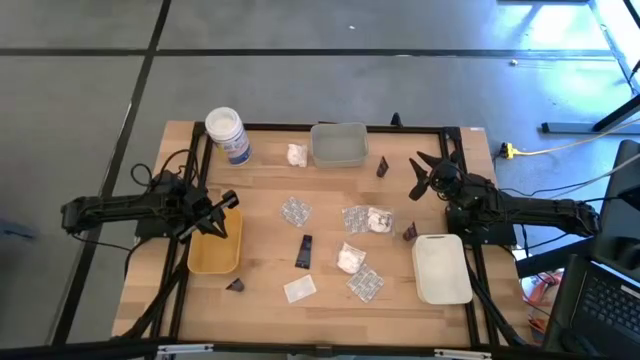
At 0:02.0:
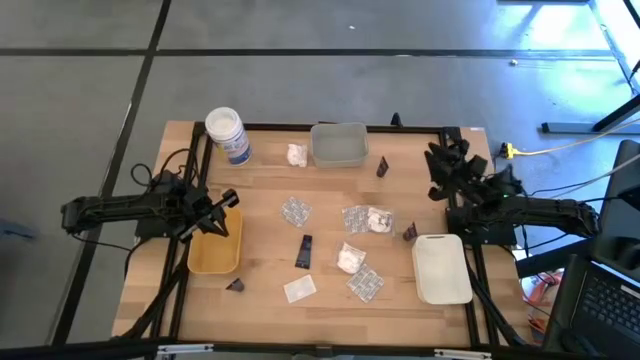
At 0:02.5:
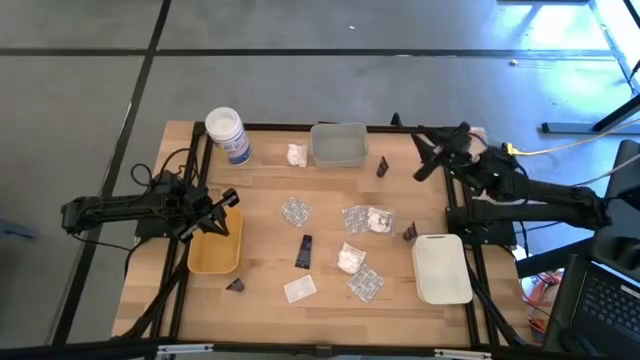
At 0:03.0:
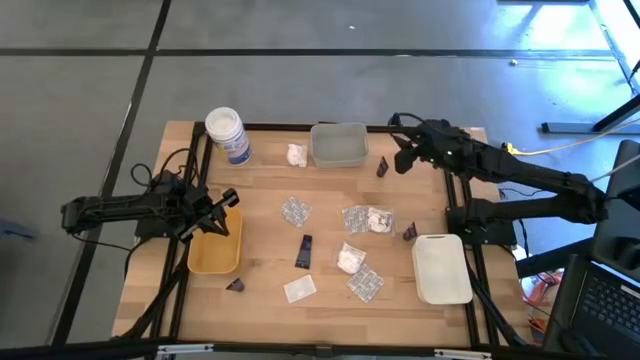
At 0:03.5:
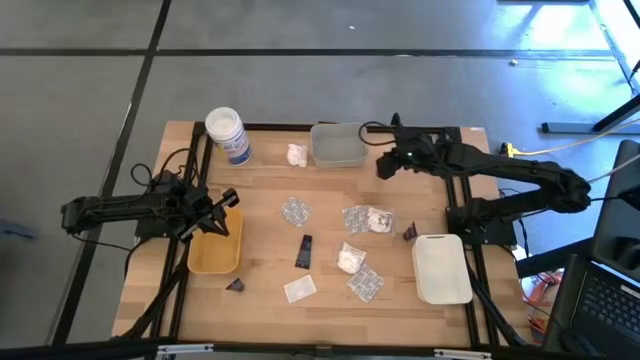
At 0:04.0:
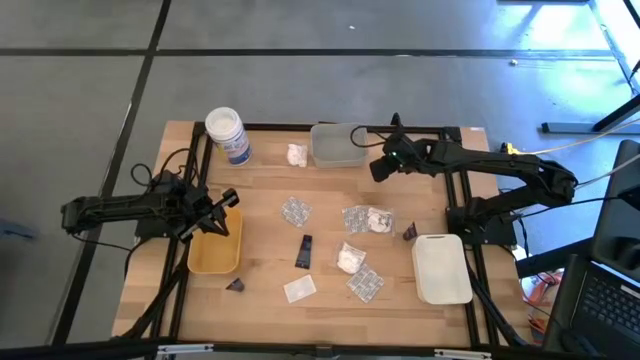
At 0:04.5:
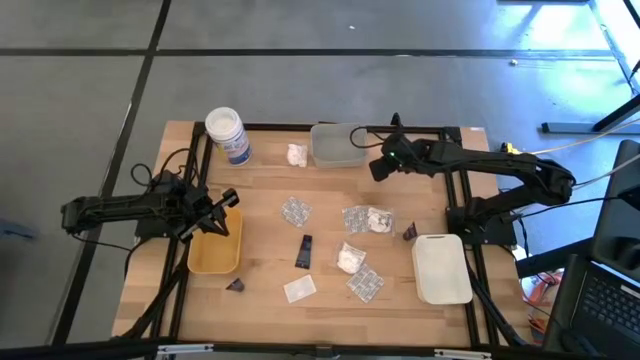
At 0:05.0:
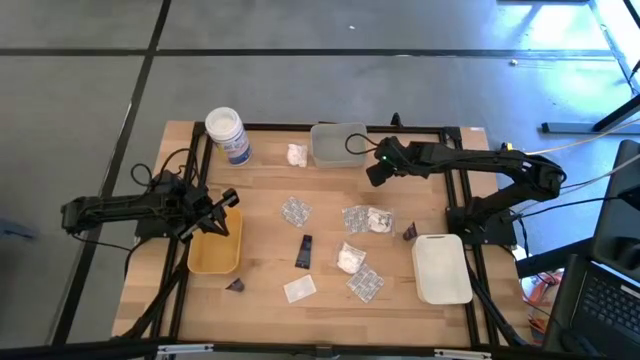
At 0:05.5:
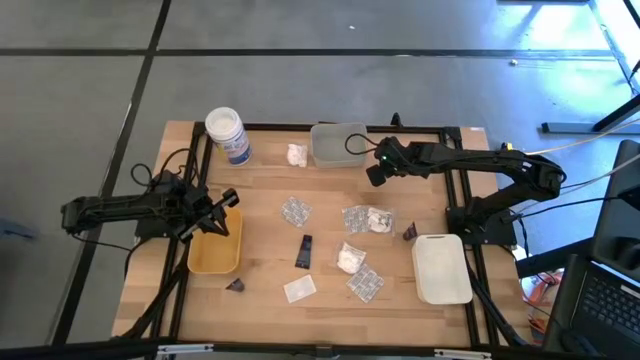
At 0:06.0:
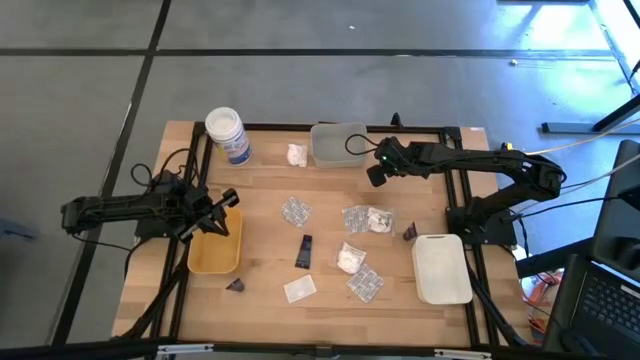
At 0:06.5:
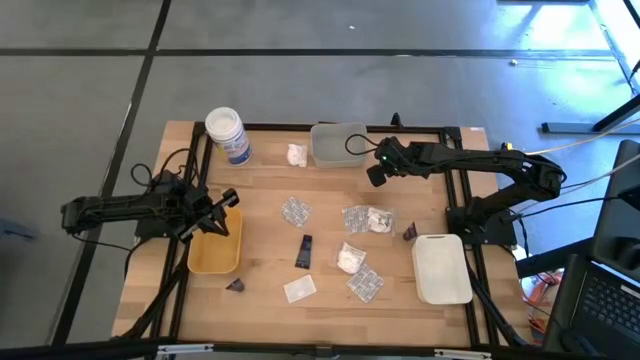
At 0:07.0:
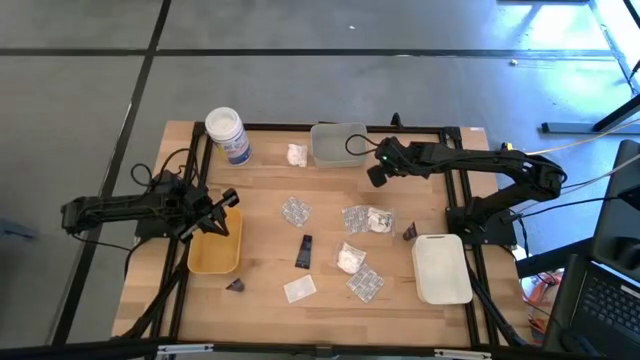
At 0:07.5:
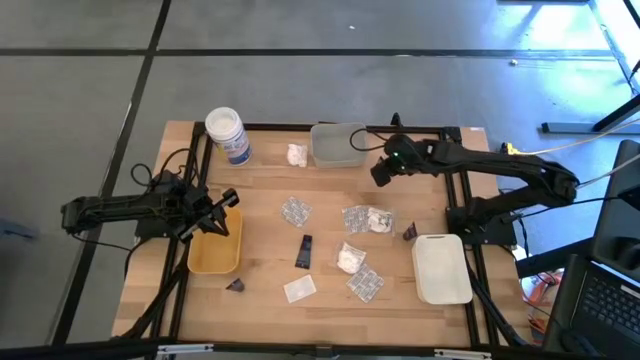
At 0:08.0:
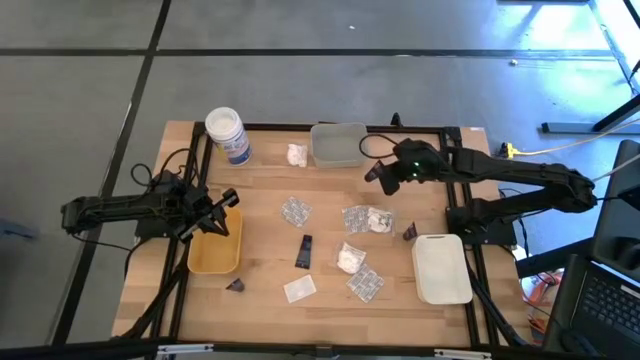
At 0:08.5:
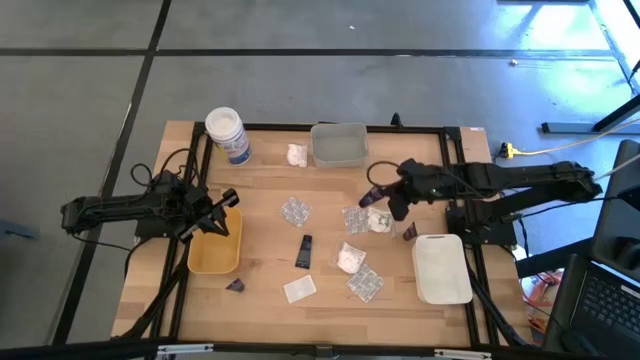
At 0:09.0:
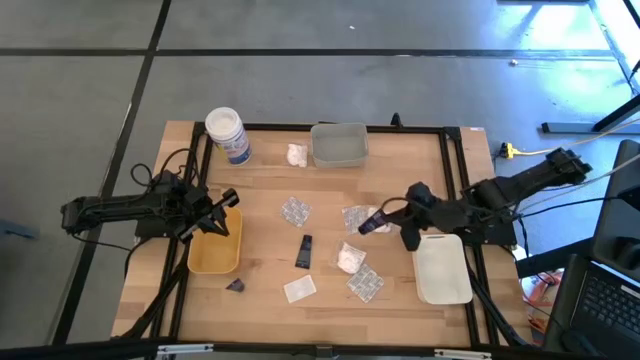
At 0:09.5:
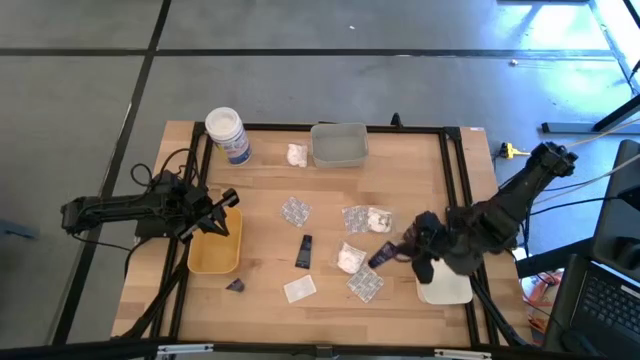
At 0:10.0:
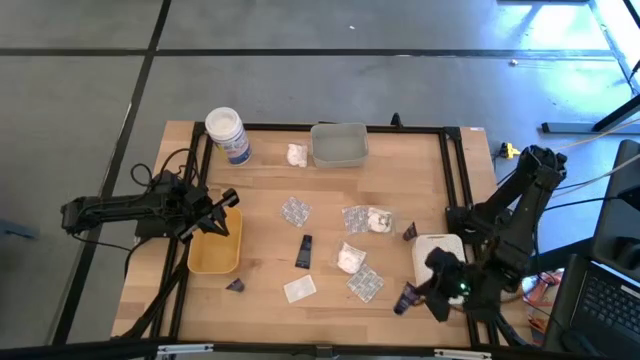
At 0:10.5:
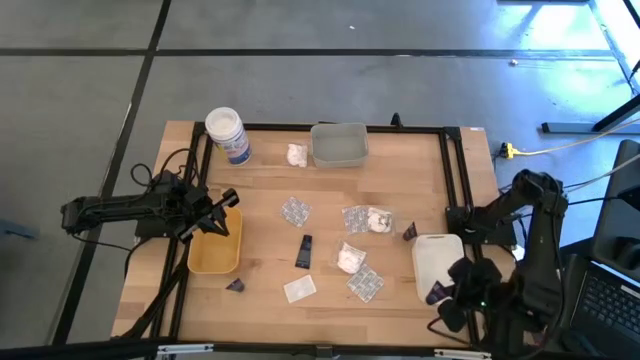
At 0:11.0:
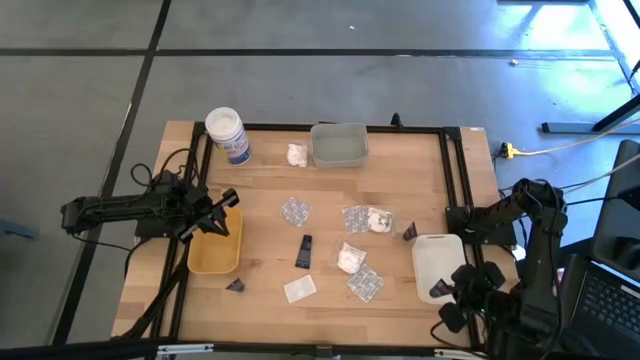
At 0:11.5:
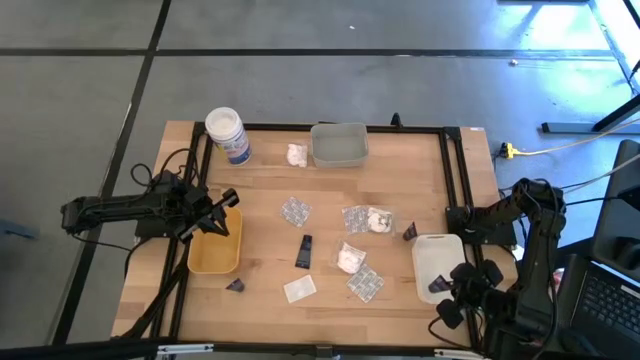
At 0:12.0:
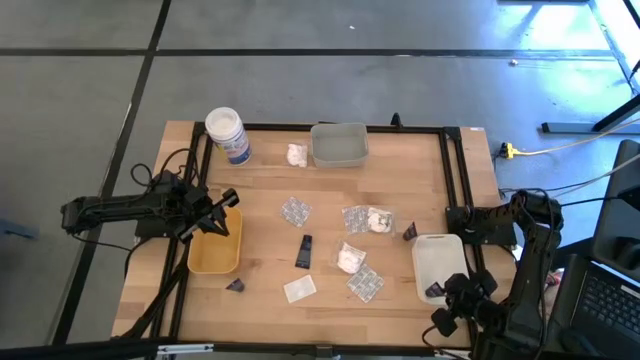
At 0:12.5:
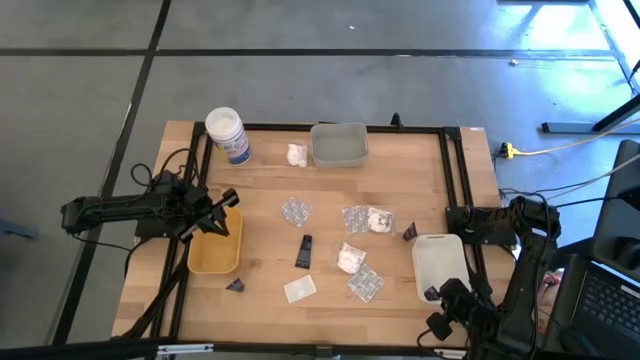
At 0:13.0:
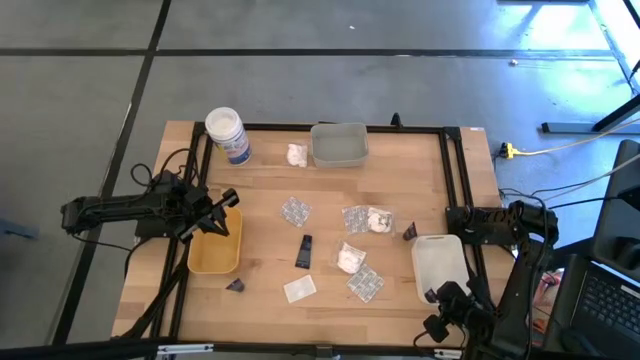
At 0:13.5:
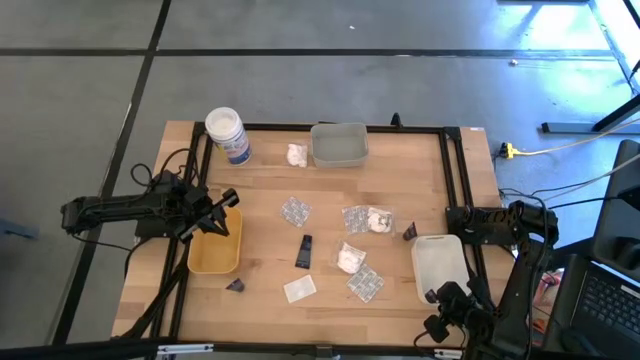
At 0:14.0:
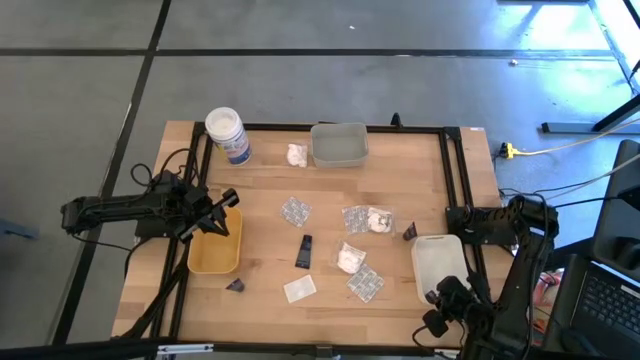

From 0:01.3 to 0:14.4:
Task: Pick & Place Travel size toiletries
Put the blue shaving cream into the white bin

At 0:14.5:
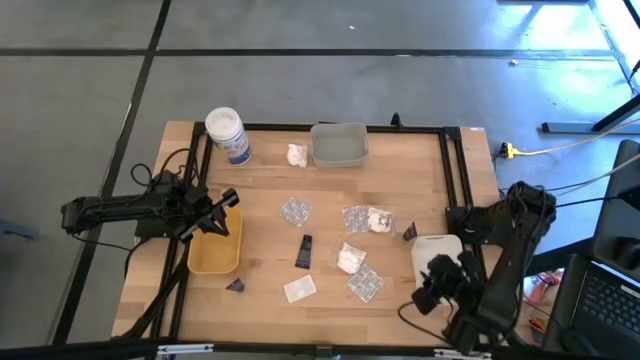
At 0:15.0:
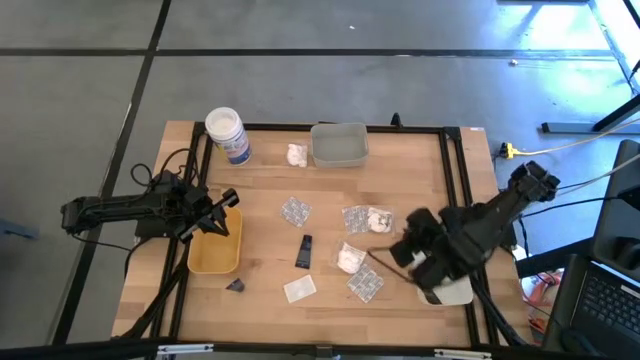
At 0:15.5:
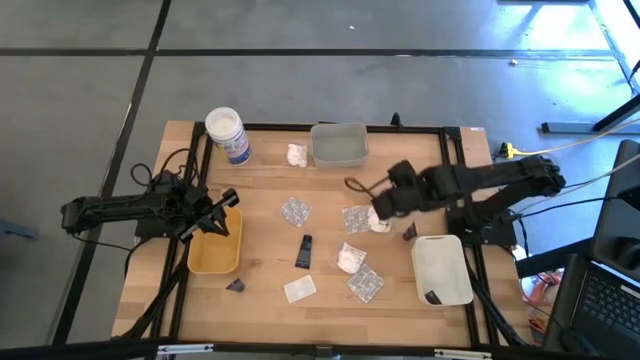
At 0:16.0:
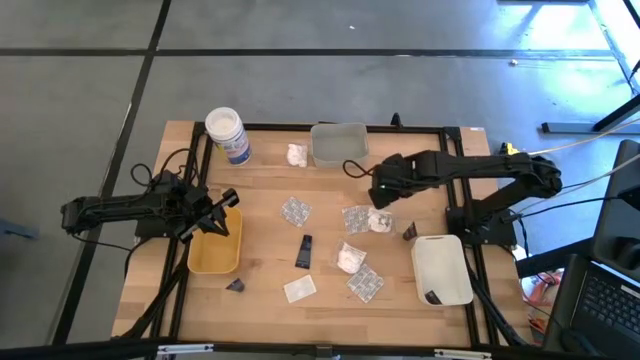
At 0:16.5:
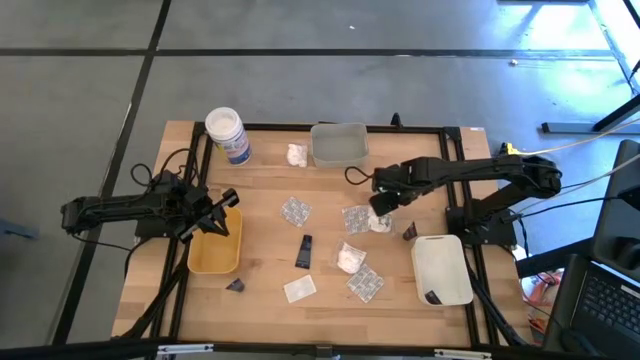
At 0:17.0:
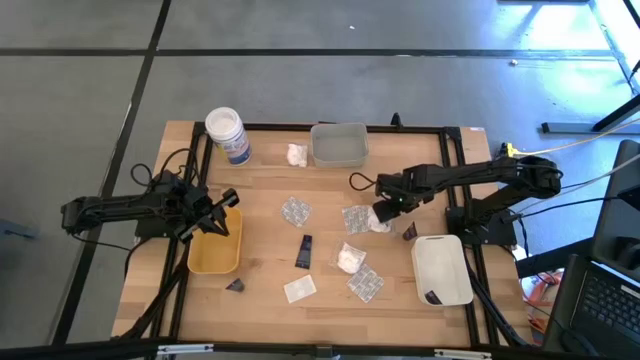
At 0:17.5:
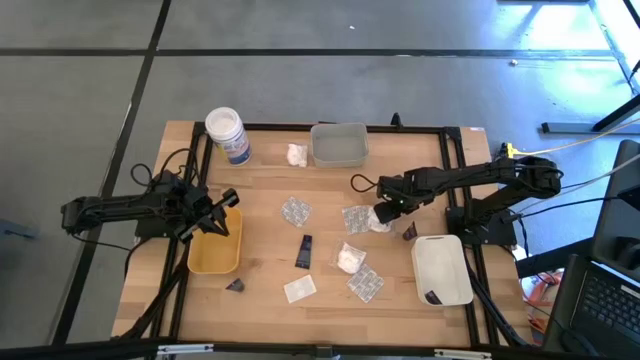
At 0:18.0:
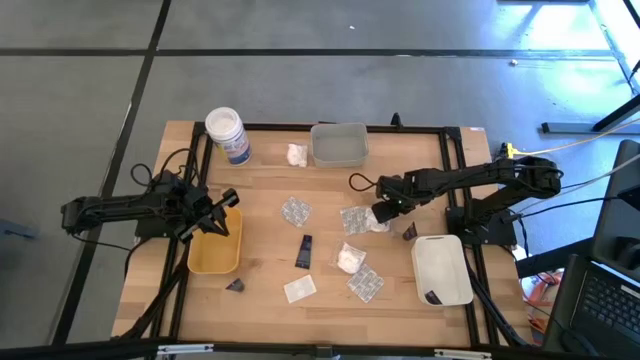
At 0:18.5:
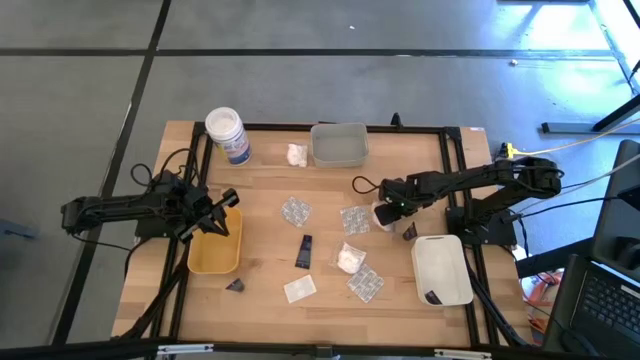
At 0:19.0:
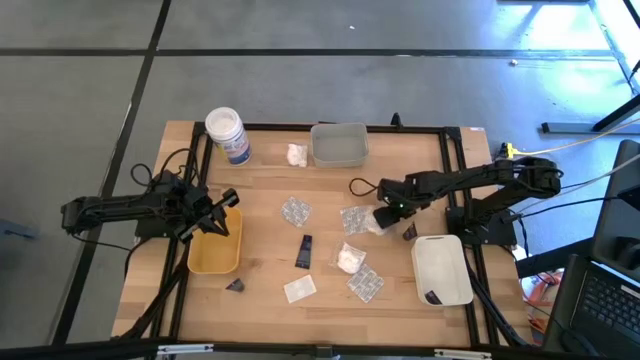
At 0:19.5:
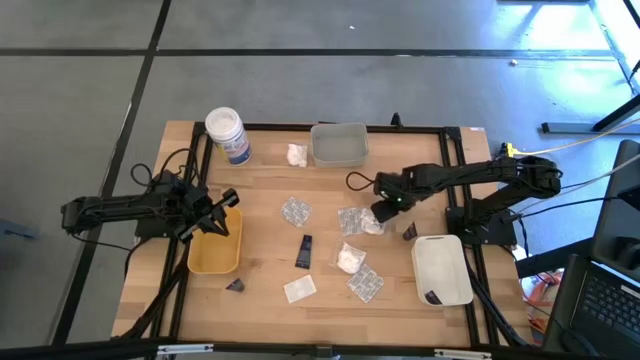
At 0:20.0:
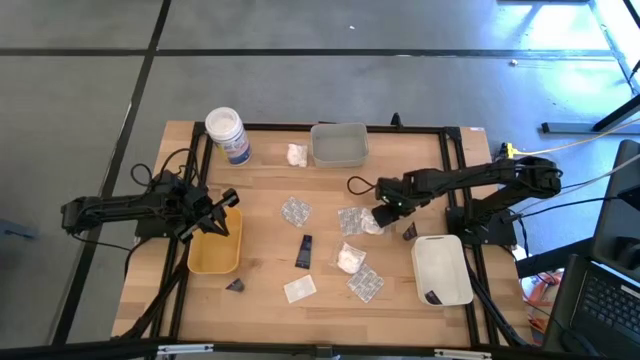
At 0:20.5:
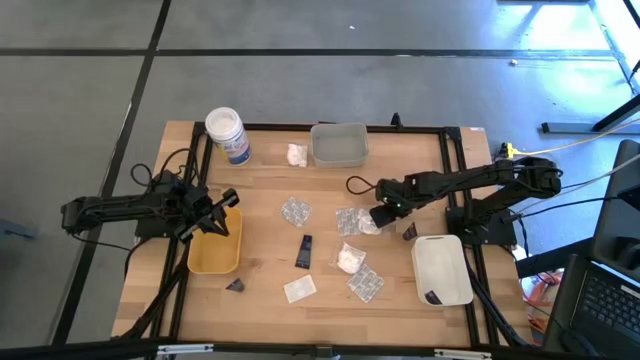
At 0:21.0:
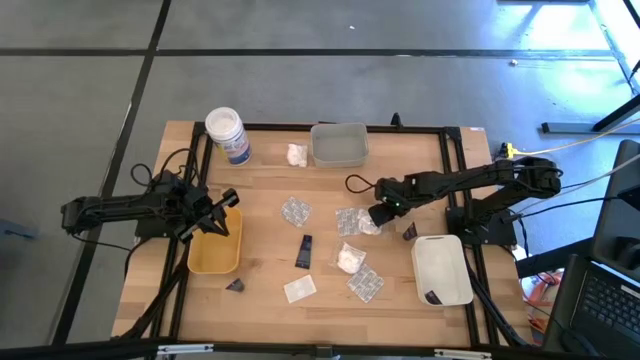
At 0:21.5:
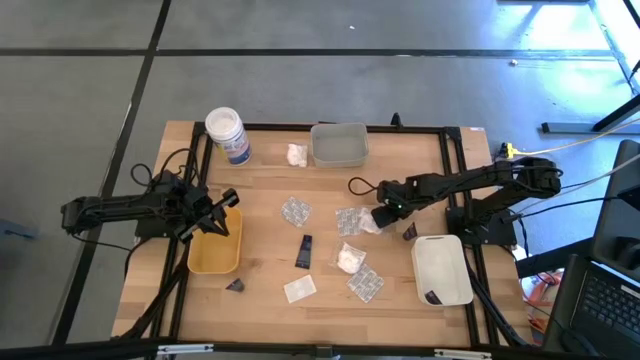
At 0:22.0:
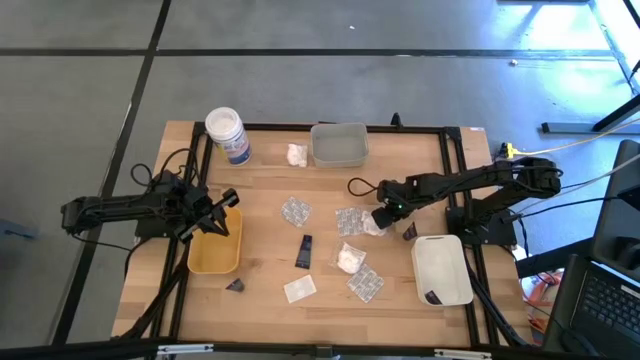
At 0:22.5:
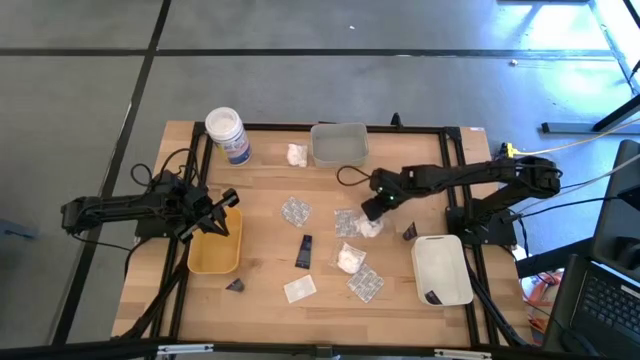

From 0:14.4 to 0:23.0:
Put the white cotton pack into the gray bin
